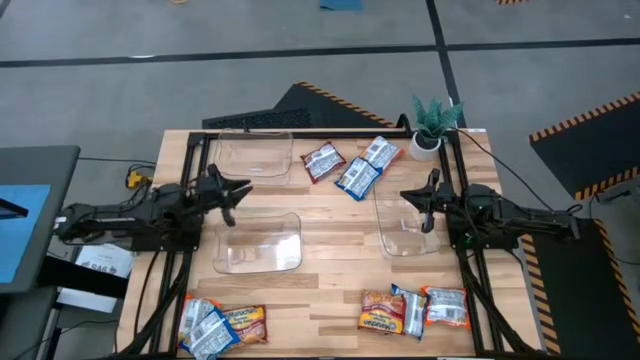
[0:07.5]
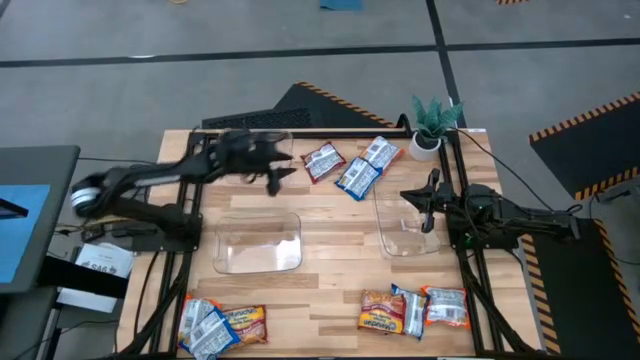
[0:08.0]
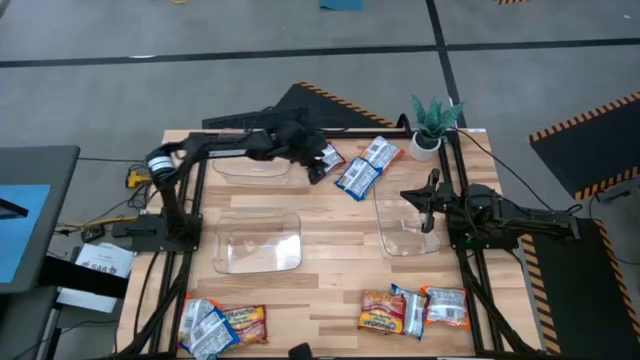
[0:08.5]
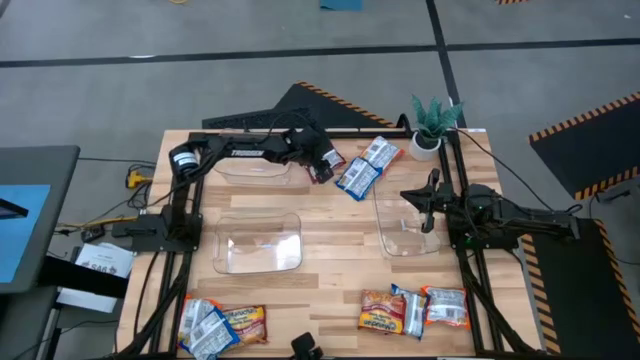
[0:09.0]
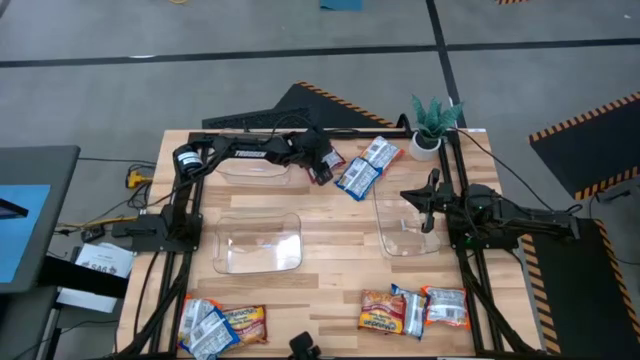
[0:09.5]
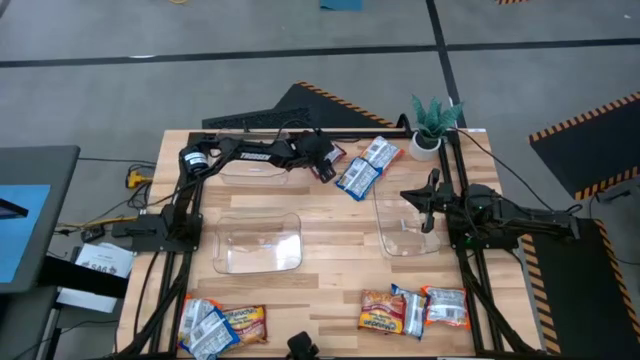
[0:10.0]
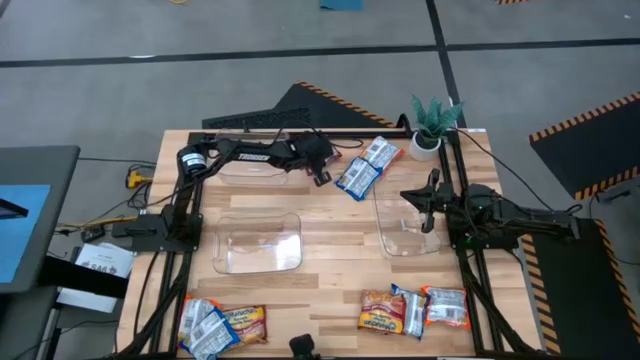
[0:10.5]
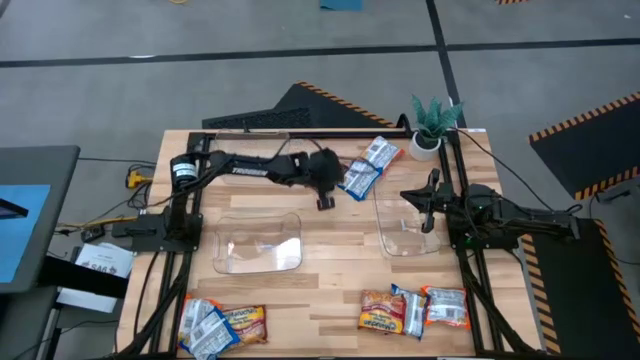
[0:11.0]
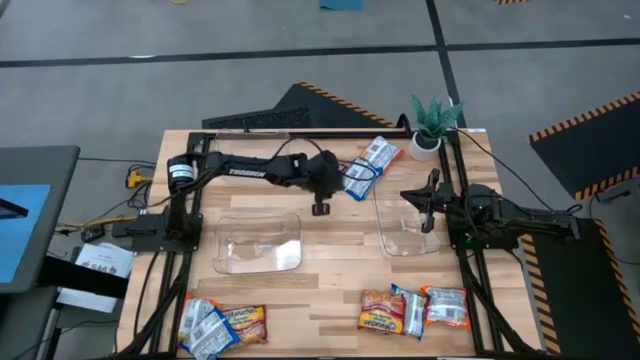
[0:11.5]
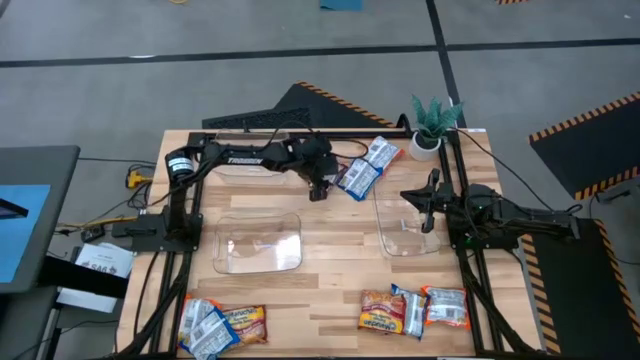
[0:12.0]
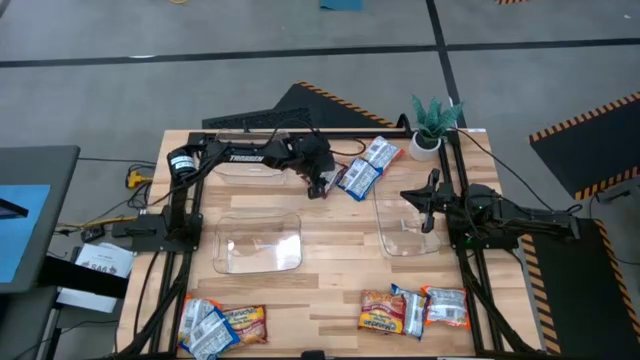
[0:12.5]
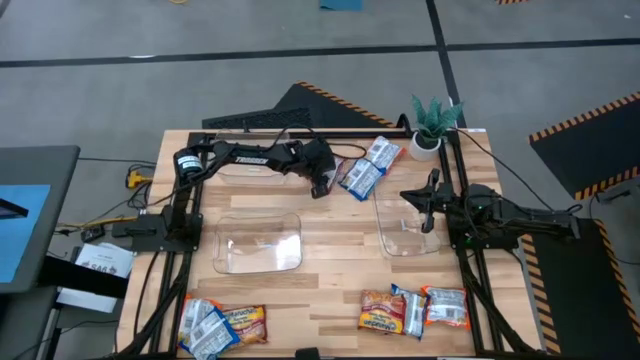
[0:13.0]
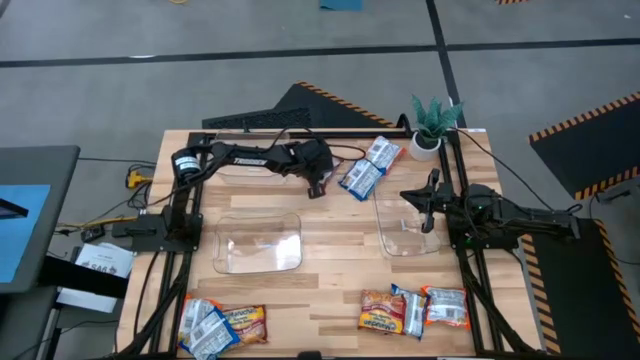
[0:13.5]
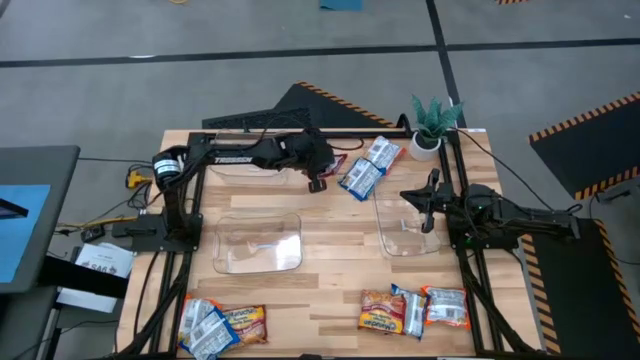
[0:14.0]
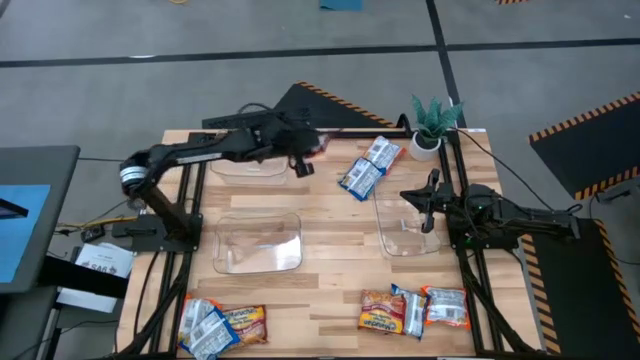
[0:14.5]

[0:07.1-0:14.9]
Task: Sort Maruchan noodles
Put the top red noodle pack into the top transparent bin

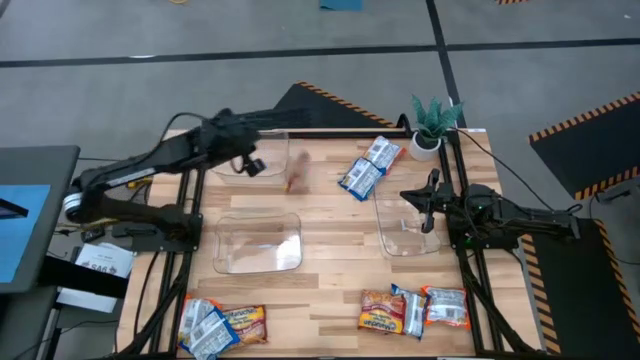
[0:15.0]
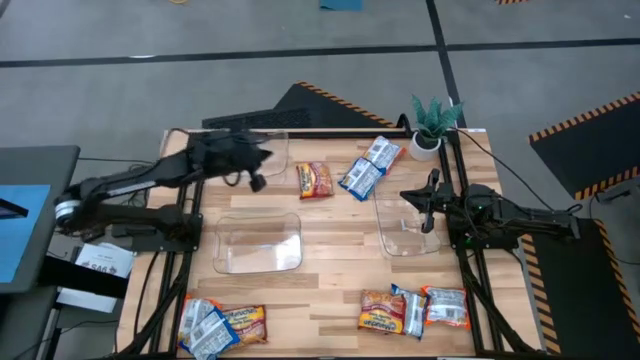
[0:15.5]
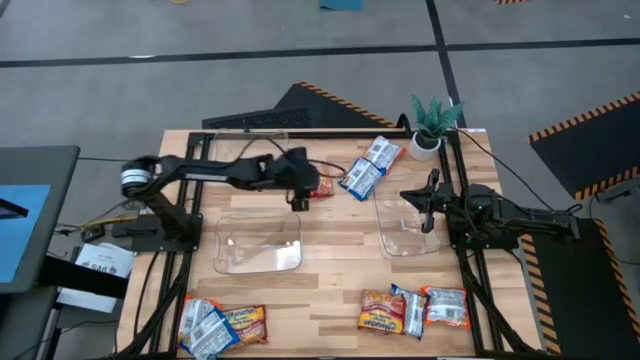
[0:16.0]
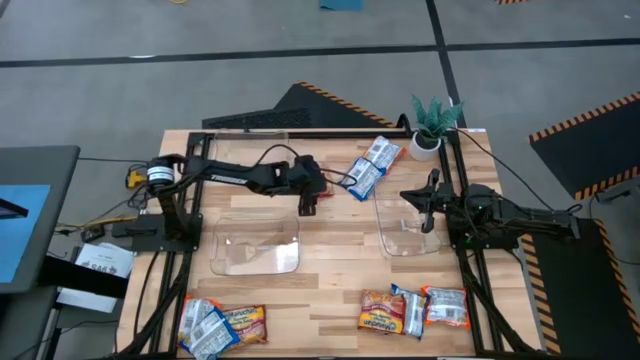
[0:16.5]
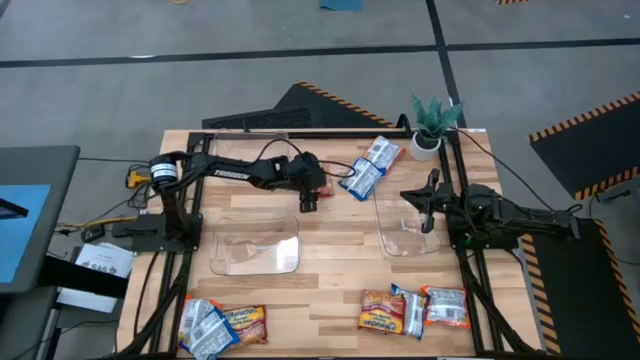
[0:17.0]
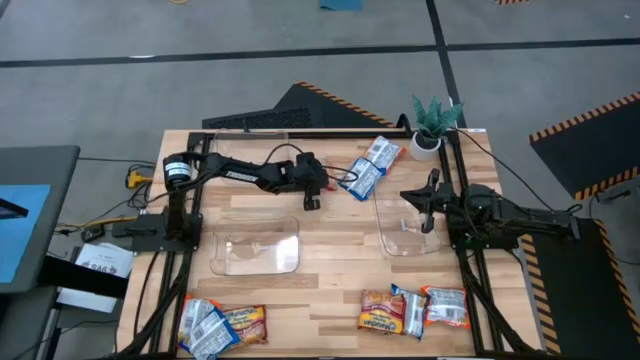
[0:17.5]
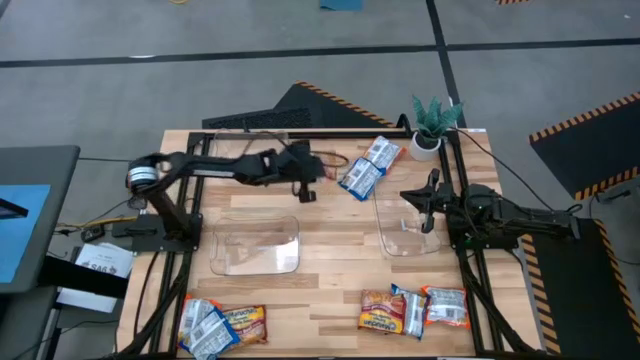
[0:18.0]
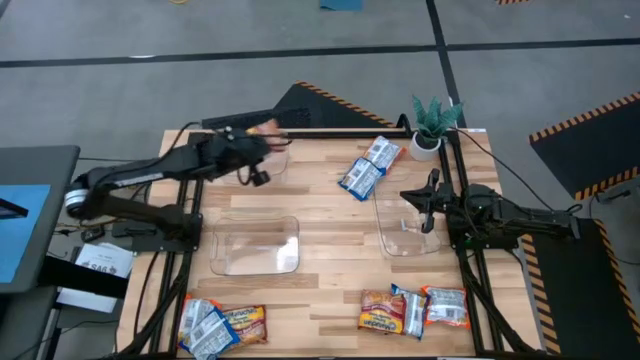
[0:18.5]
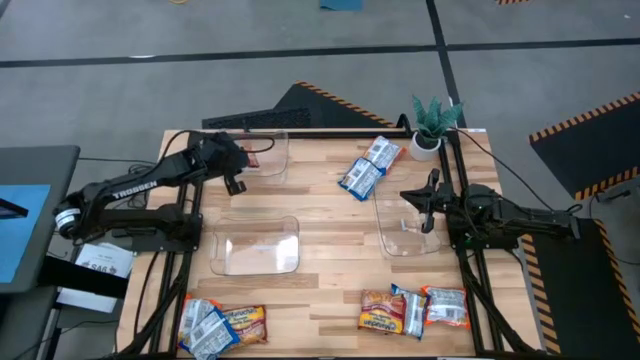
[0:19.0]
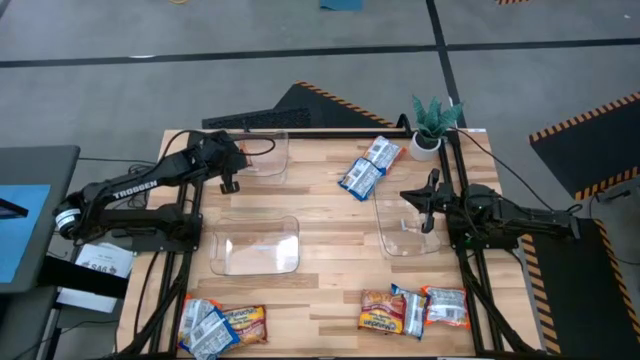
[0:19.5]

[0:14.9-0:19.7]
Put the top red noodle pack into the top transparent bin

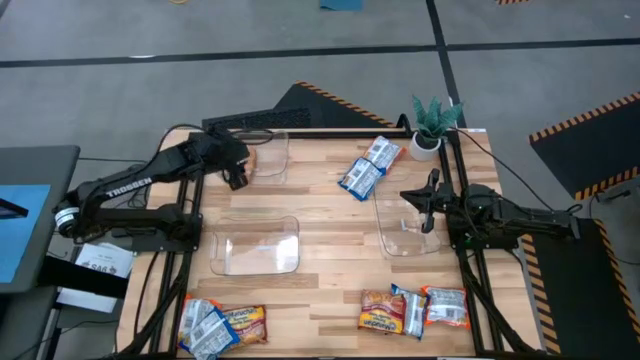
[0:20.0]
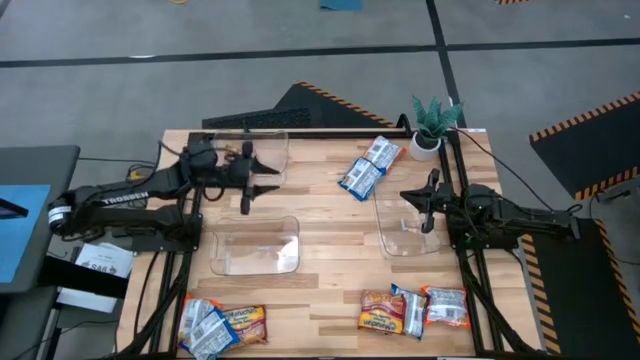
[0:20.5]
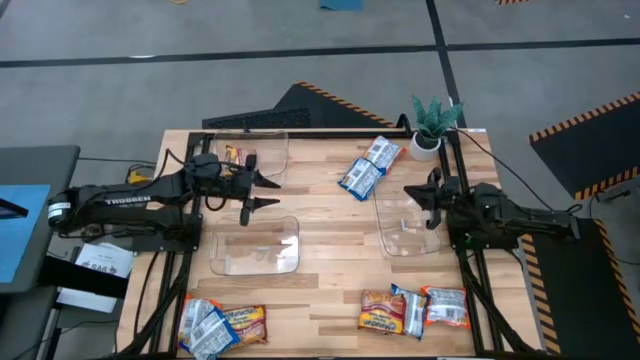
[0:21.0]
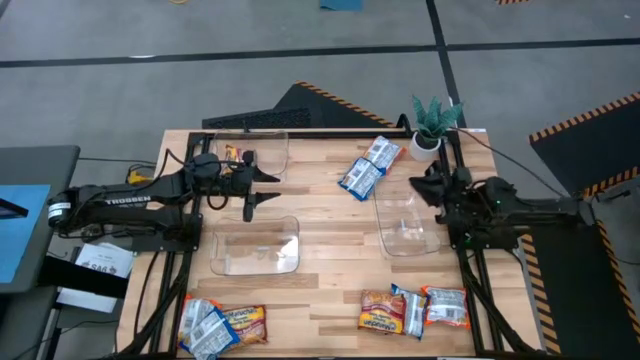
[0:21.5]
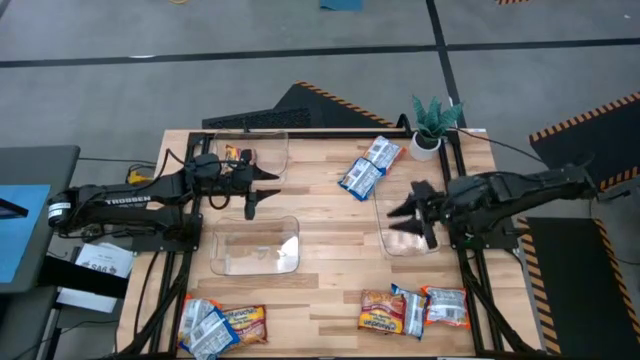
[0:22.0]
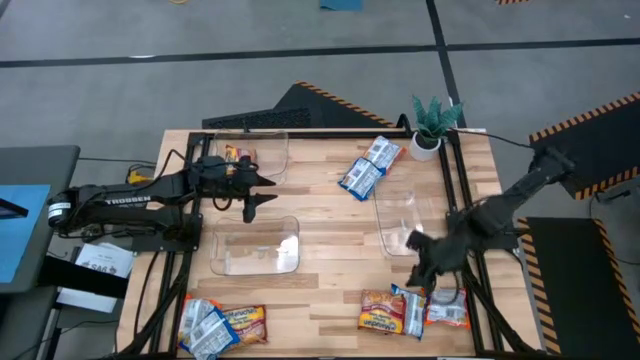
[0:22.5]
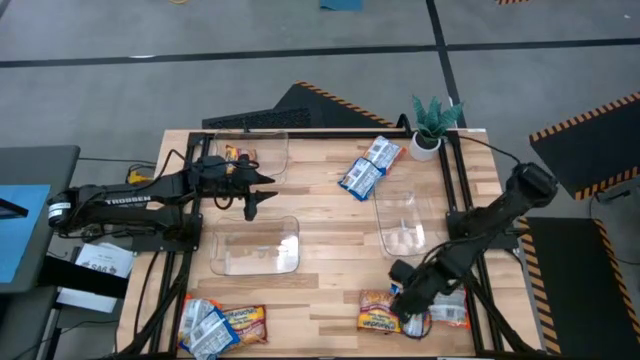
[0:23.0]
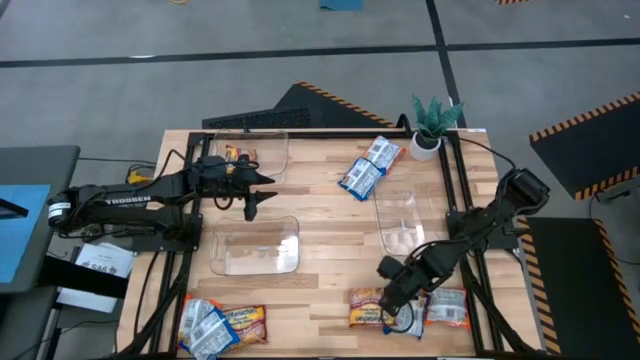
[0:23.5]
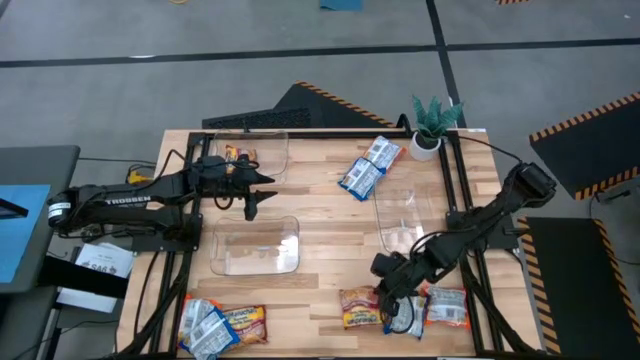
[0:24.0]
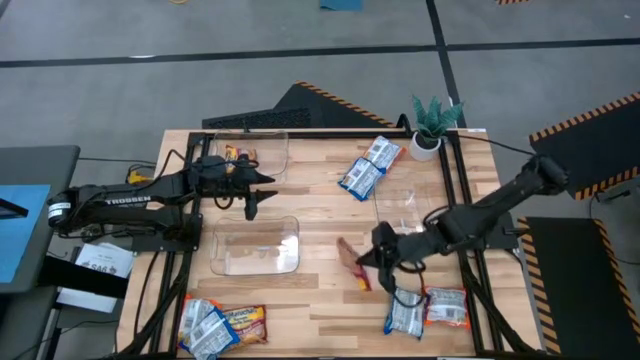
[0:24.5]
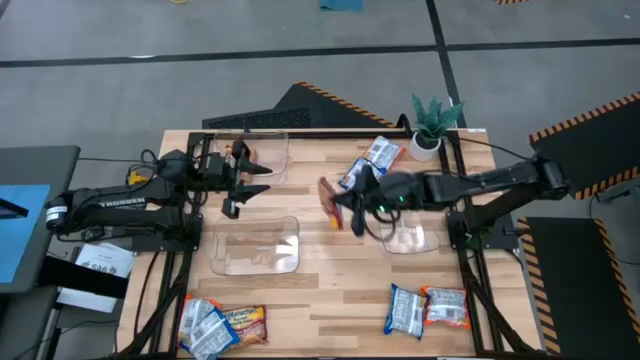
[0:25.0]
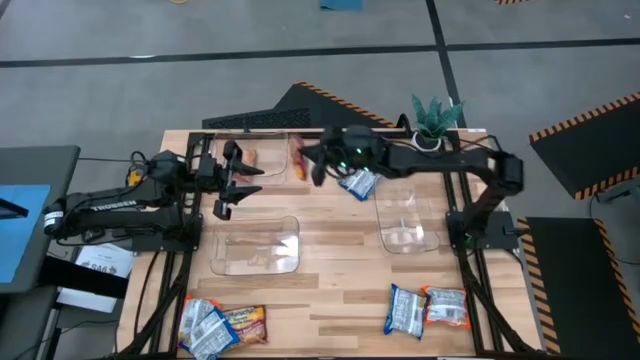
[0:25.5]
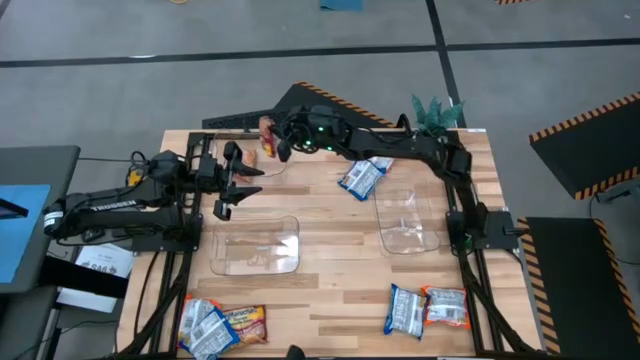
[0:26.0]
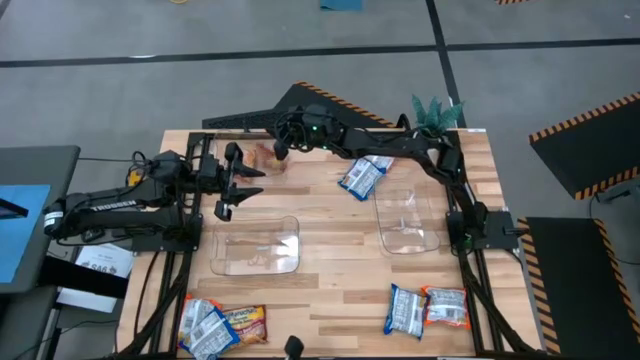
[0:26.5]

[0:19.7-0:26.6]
Put the right red noodle pack into the top transparent bin

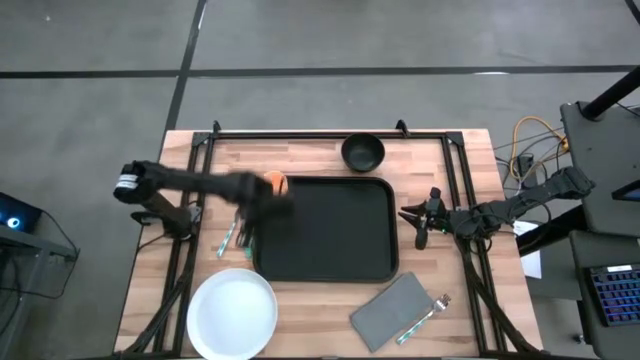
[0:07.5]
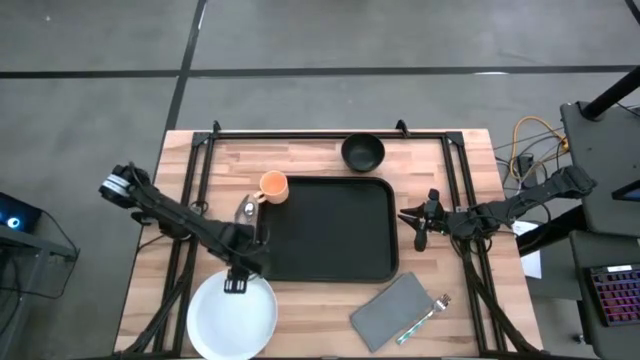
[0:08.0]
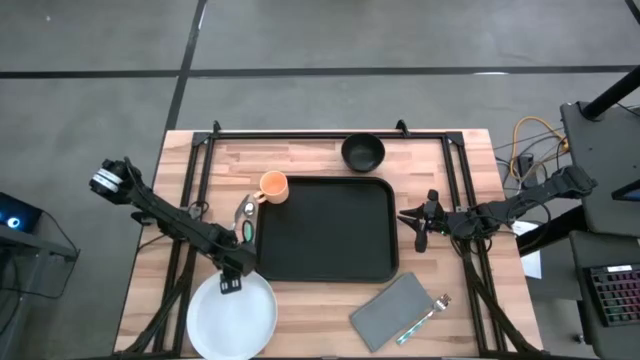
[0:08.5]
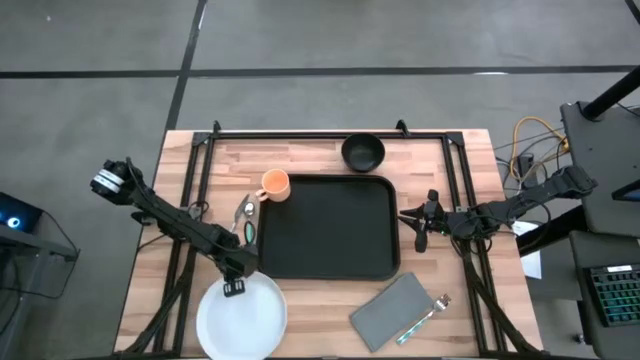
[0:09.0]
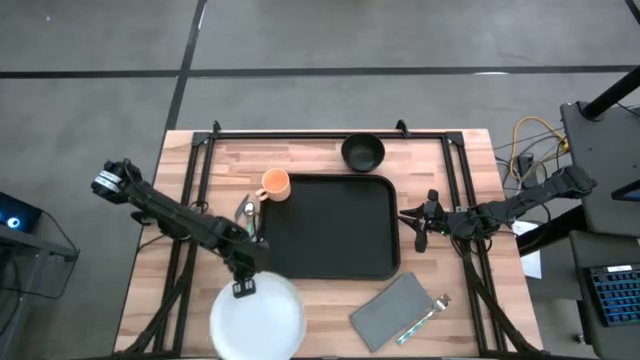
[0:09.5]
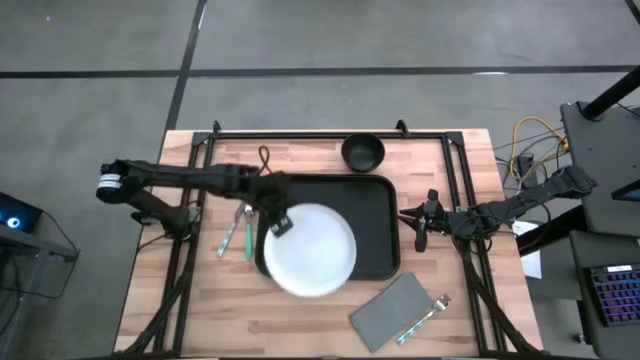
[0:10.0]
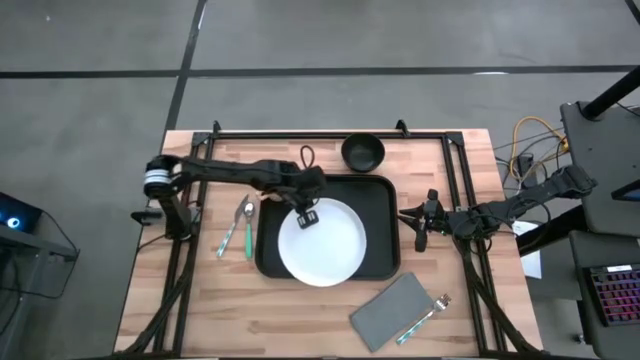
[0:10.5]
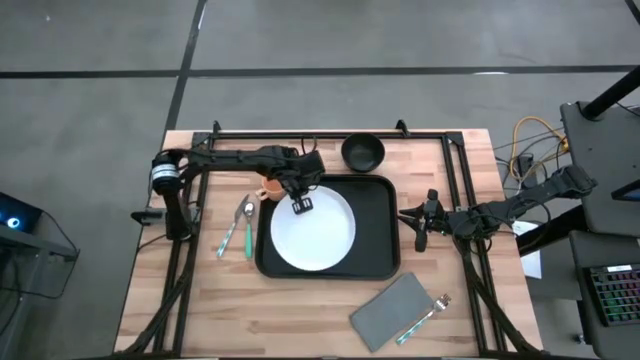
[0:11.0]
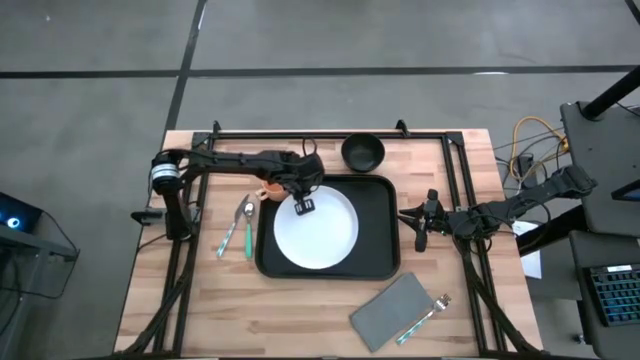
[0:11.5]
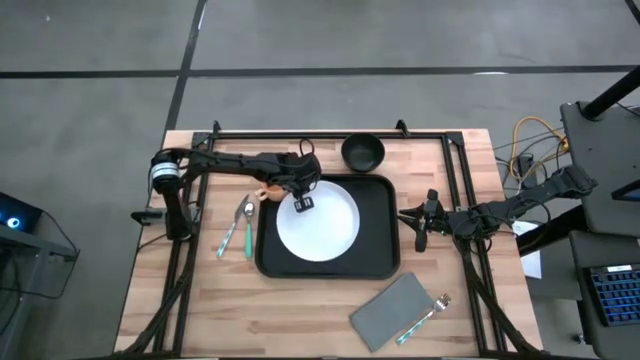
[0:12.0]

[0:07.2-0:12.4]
Task: Set up tray
Put the plate on the black serving tray to the bottom left of the yellow mug
